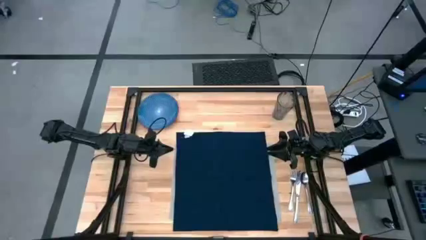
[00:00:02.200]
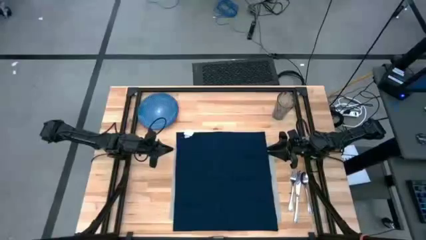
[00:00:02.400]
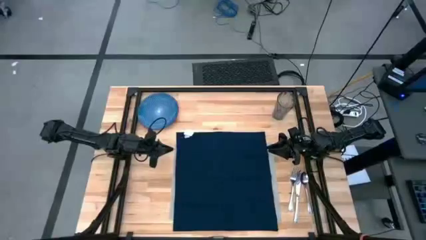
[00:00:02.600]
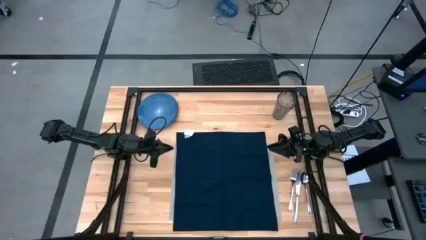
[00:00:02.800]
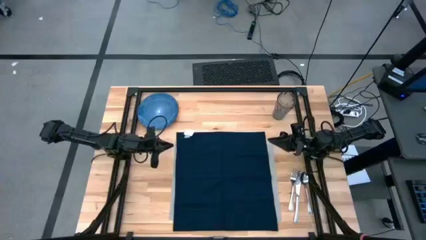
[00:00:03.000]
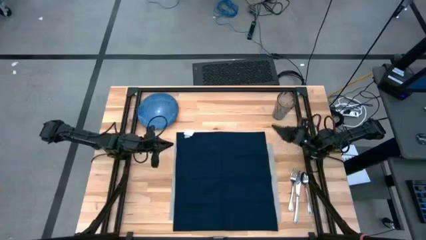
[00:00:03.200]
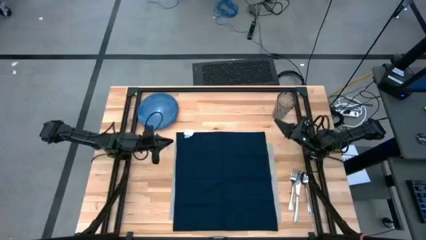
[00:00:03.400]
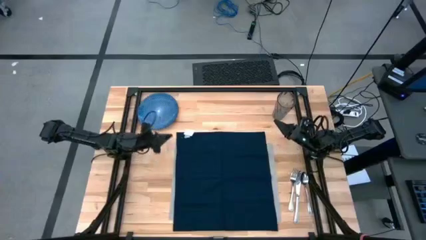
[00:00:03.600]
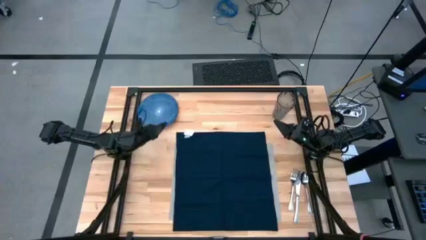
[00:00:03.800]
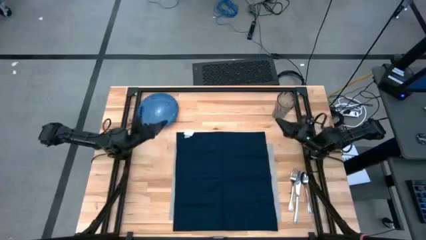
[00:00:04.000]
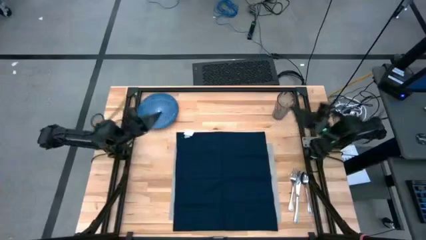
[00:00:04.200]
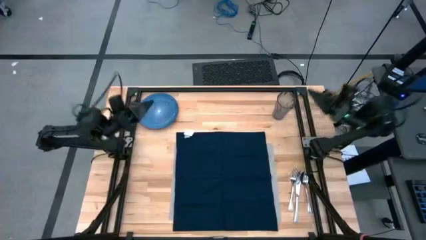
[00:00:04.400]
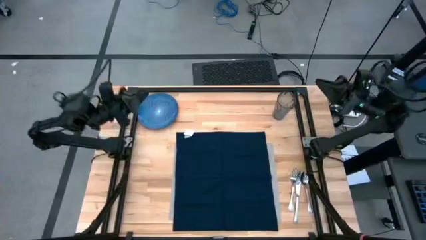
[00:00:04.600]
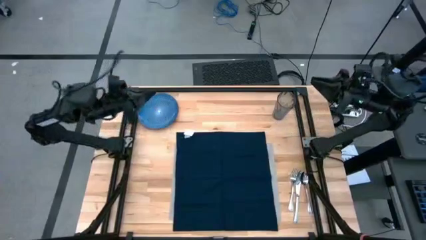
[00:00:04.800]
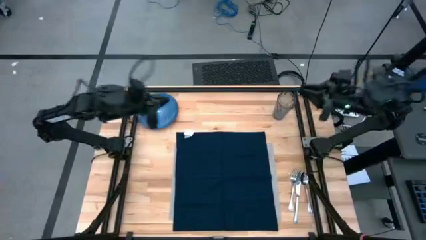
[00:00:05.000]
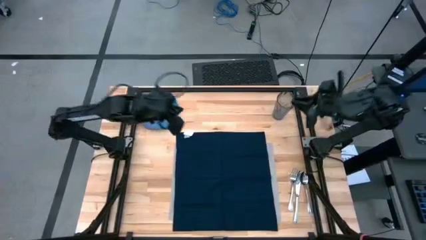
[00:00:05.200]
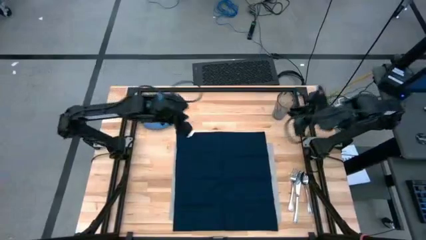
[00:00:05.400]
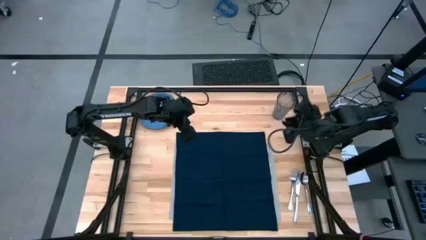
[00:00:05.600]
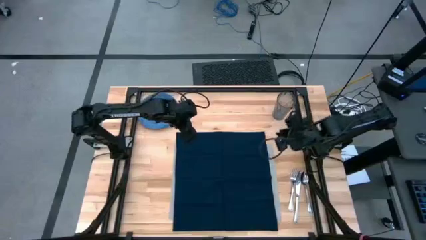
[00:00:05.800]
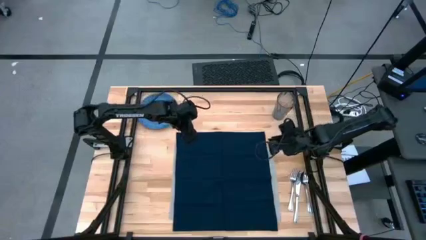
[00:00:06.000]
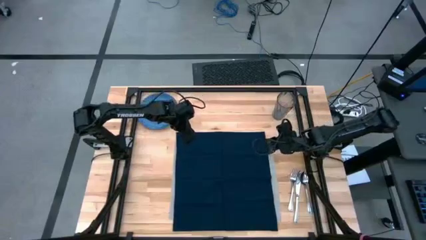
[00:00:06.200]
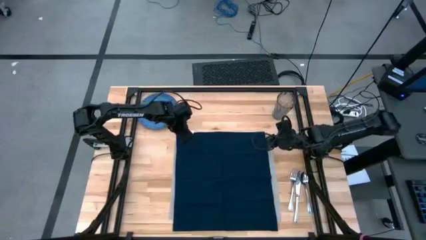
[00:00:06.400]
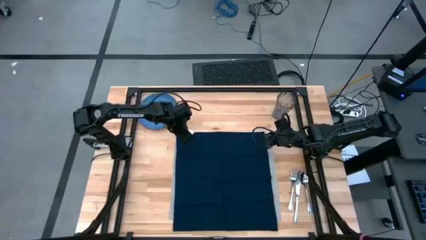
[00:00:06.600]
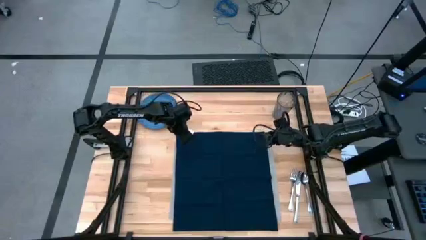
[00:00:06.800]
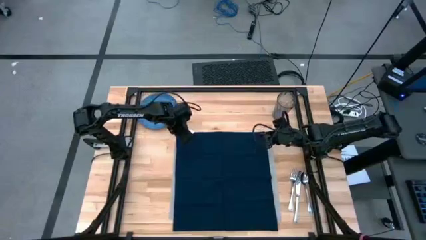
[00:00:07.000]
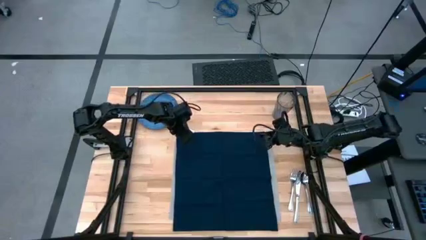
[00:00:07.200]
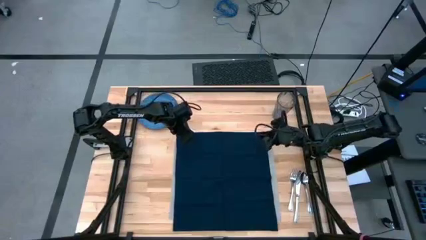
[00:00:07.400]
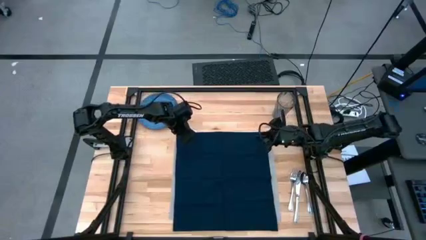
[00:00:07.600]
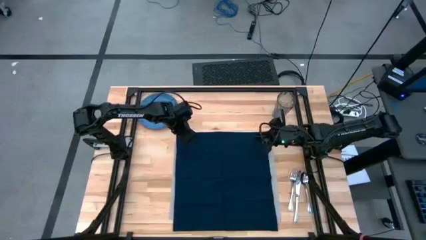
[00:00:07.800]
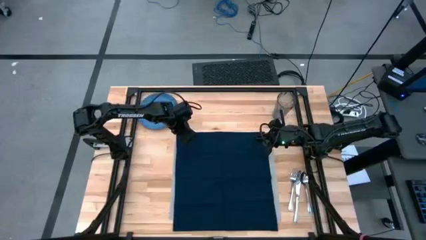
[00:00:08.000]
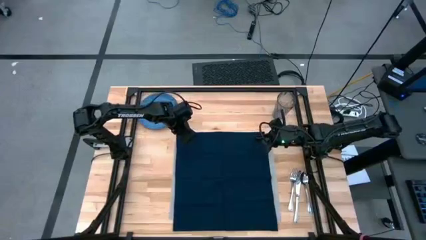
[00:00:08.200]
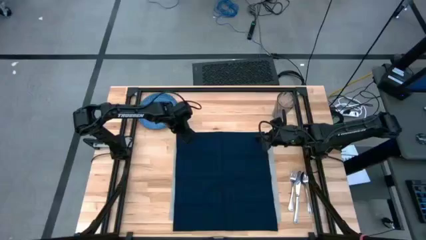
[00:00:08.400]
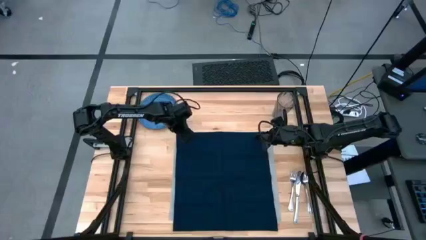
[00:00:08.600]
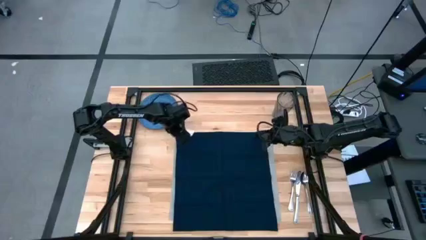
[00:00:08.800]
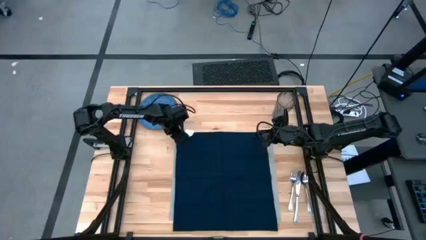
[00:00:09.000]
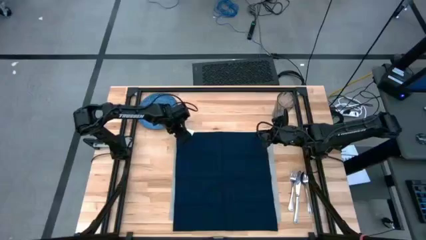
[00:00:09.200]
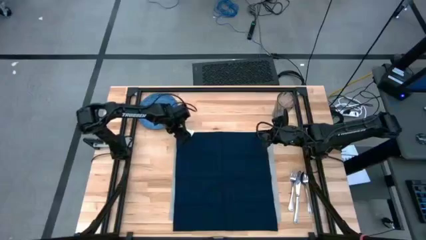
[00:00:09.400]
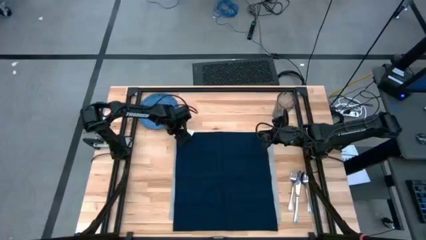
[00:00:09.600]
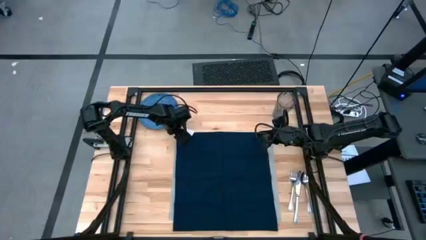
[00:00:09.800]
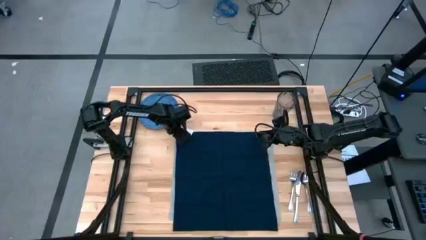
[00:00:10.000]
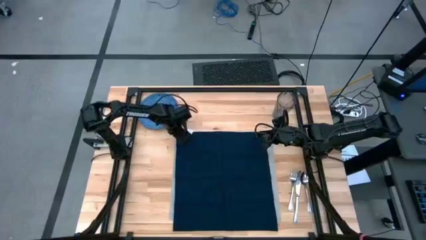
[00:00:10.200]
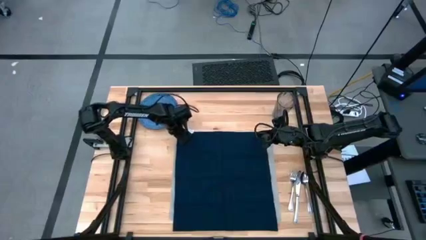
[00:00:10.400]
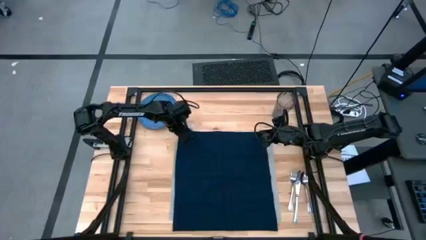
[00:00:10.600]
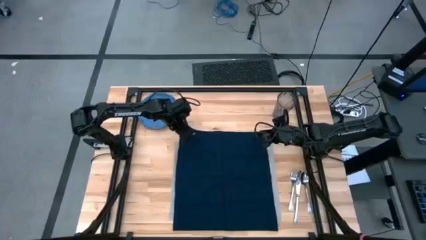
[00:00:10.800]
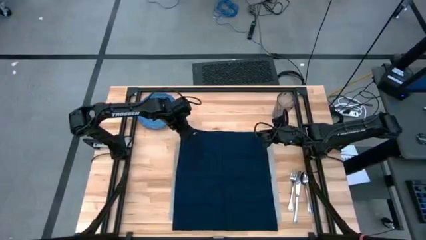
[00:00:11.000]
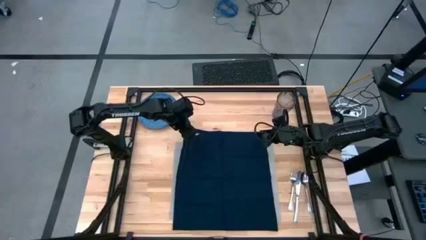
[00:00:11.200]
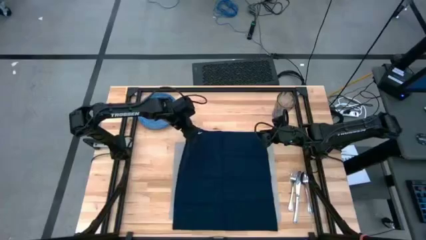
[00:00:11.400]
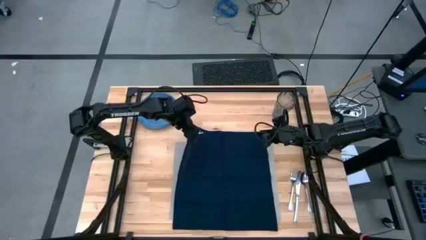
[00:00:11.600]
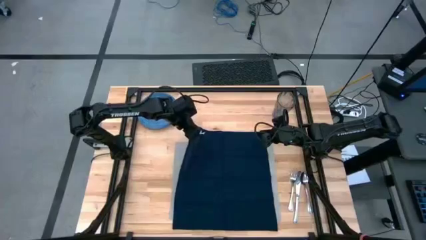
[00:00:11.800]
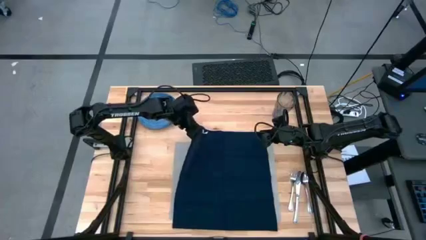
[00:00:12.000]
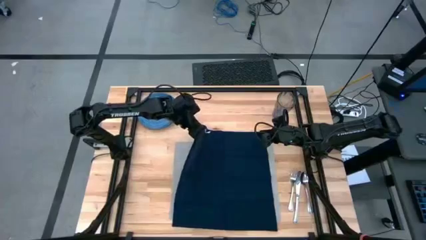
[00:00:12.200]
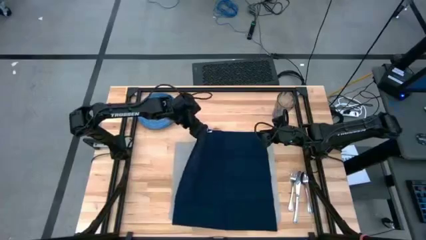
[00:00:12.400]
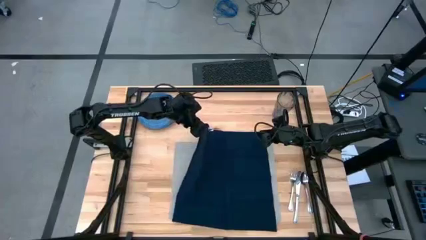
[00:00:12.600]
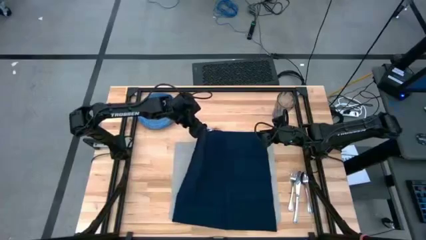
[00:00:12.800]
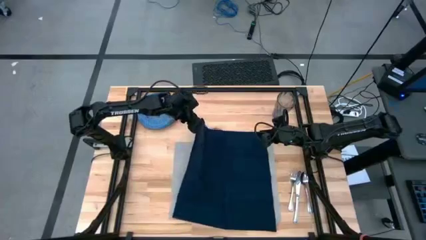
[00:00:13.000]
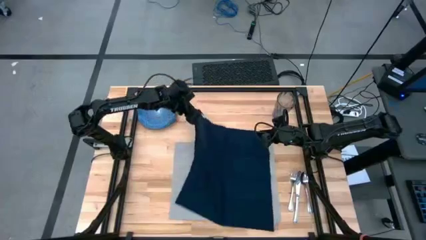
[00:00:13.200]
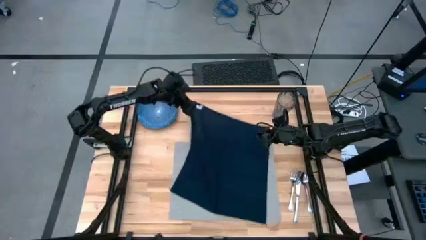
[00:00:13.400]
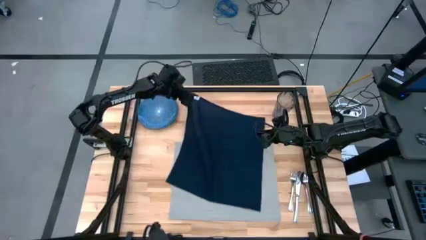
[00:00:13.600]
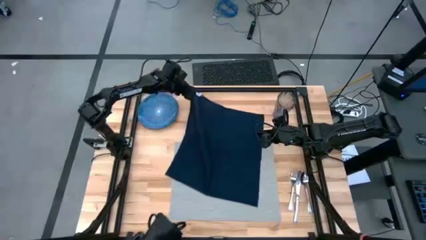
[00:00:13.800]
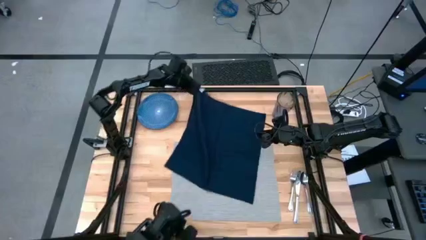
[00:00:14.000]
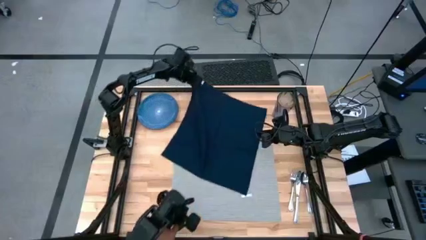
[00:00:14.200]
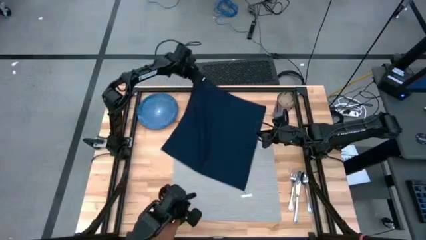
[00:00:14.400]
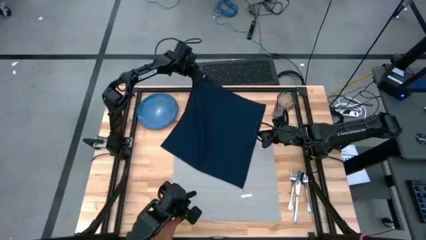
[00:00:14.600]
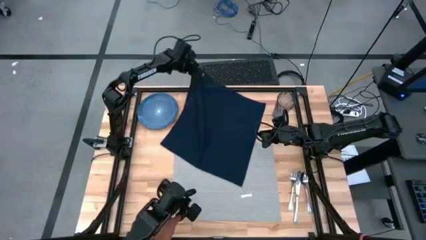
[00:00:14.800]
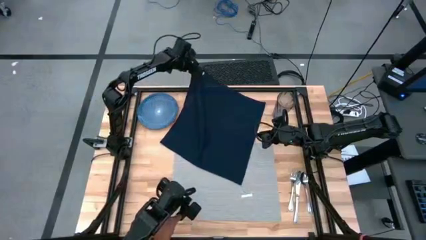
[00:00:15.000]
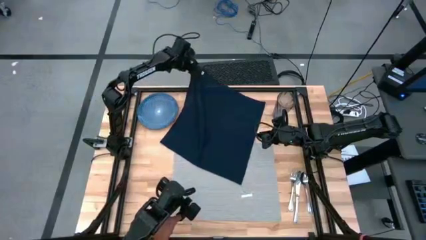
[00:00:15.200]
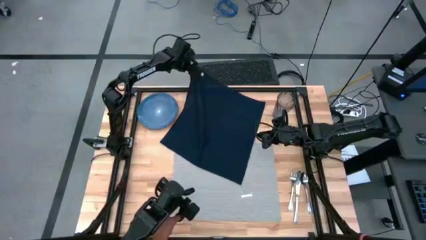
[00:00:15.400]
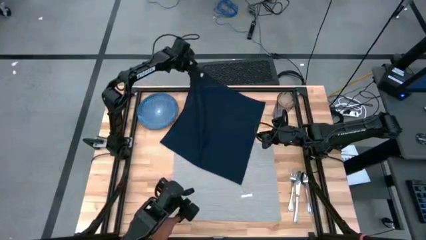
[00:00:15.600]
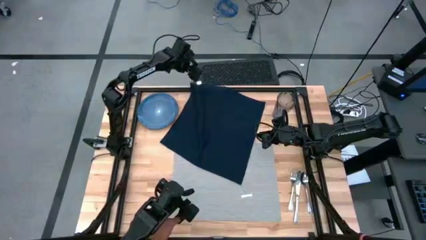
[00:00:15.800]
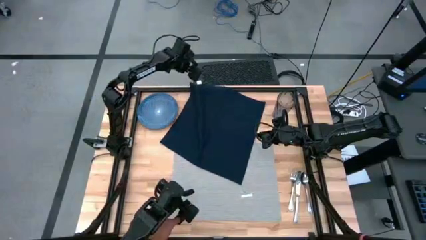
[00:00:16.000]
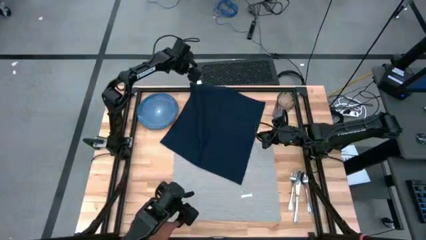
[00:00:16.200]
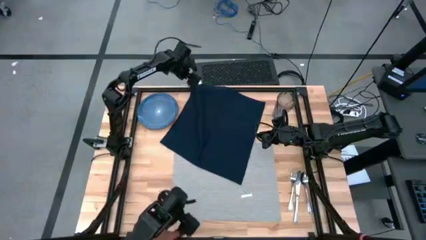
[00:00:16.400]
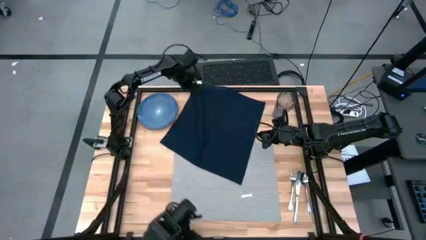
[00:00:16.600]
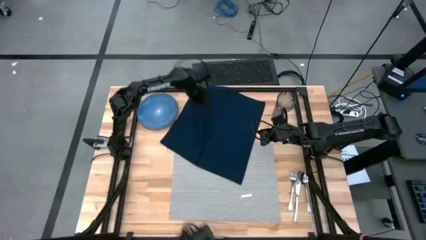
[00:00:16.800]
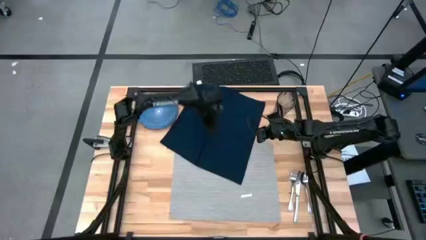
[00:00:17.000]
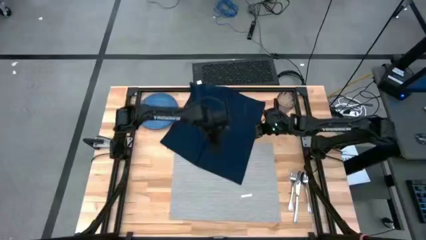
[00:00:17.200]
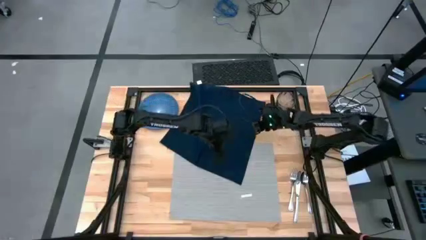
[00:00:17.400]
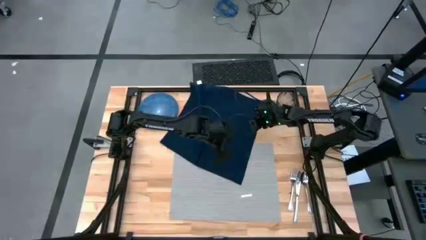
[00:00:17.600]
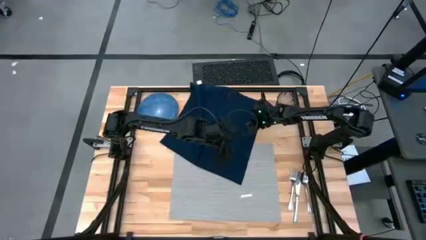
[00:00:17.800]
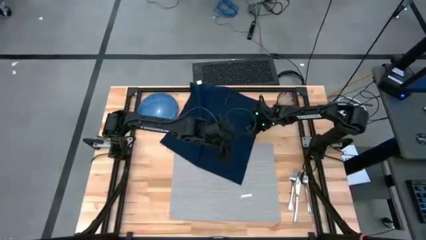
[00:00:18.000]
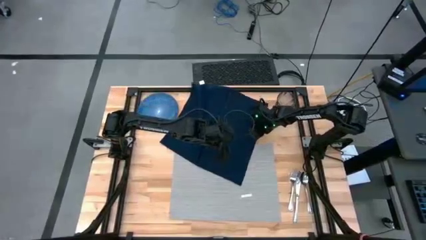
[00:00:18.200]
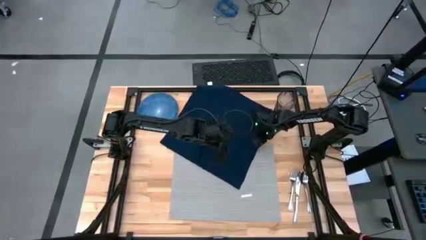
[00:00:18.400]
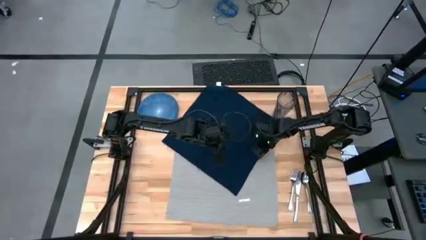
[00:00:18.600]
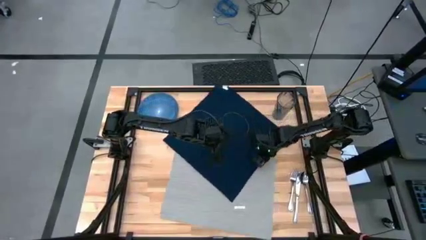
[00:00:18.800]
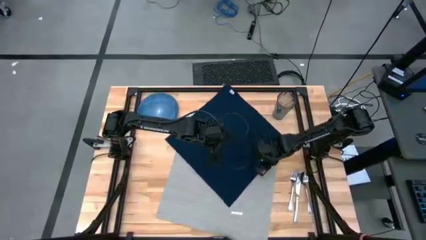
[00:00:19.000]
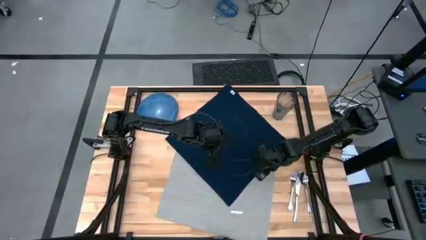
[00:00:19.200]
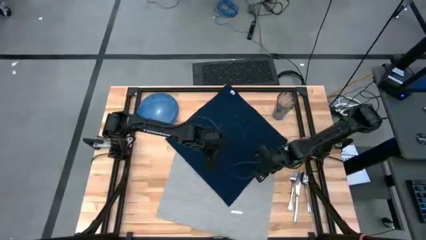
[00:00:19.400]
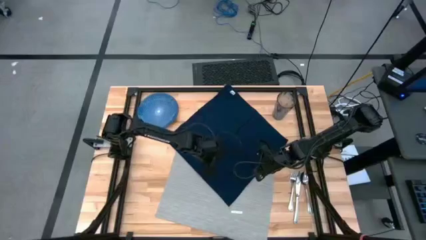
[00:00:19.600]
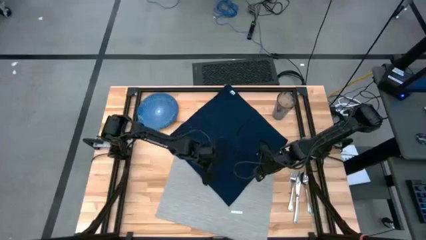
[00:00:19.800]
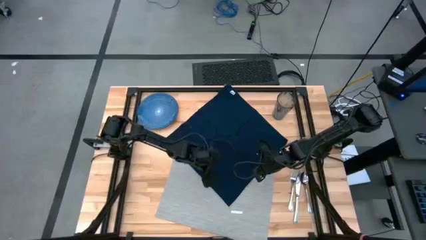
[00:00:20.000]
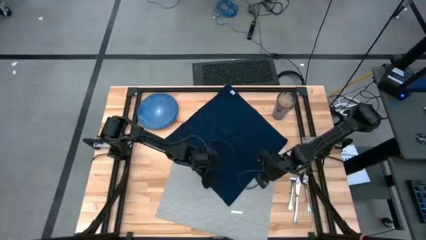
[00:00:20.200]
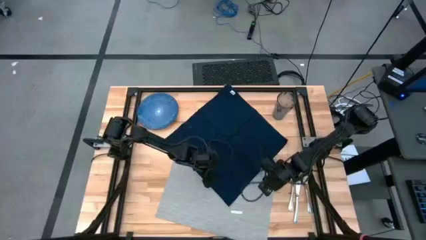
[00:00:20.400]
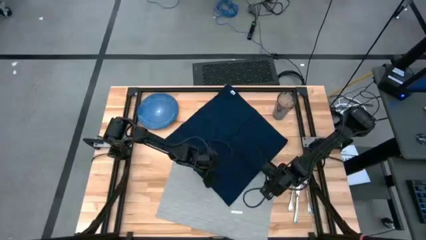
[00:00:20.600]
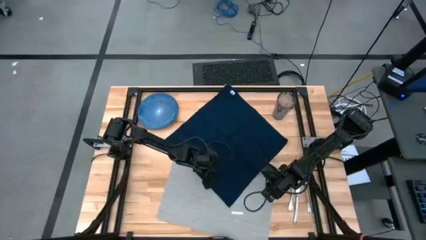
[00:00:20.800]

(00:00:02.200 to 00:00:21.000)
Task: Set table place
Fold the dark blue napkin
